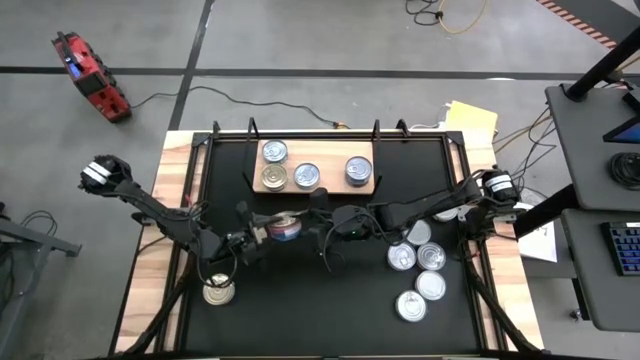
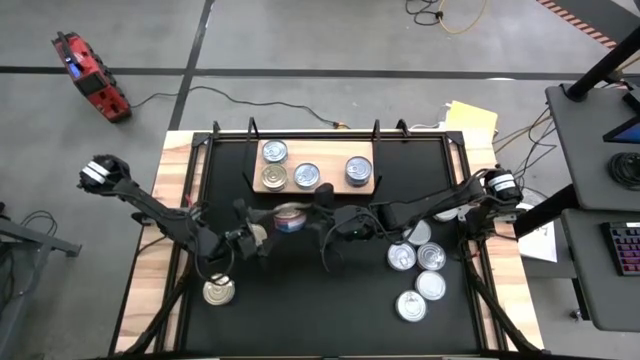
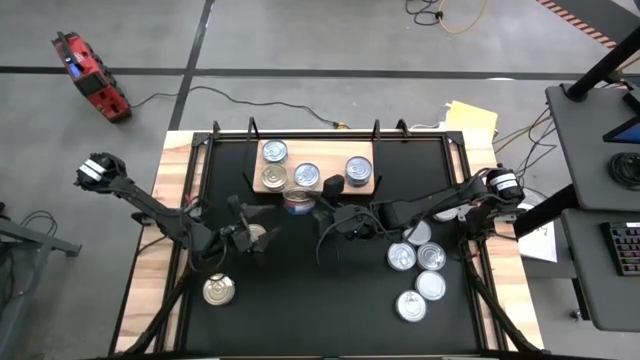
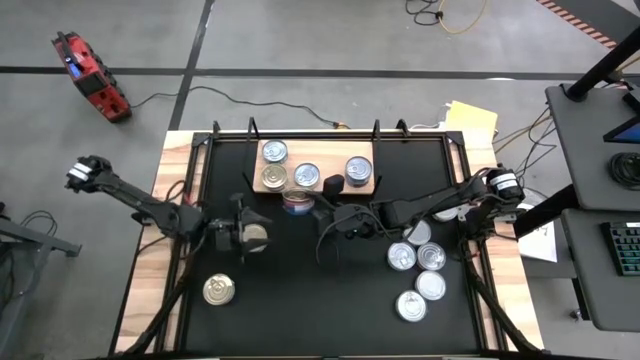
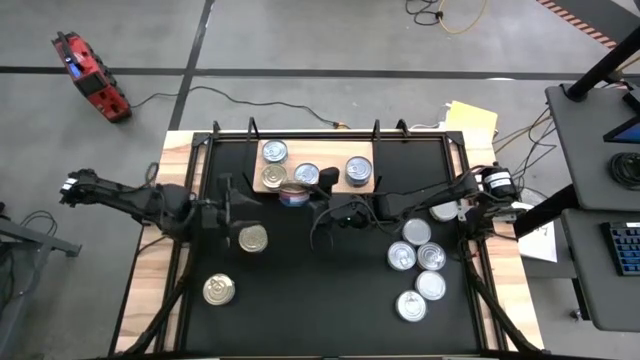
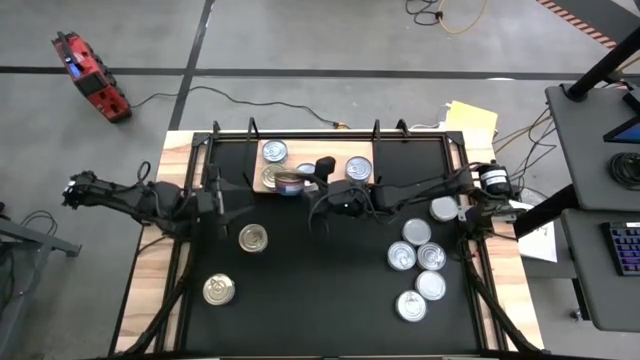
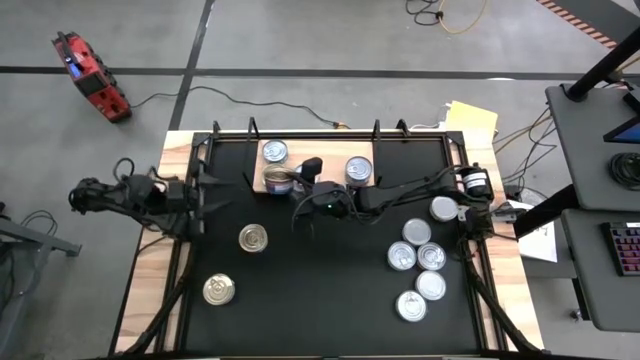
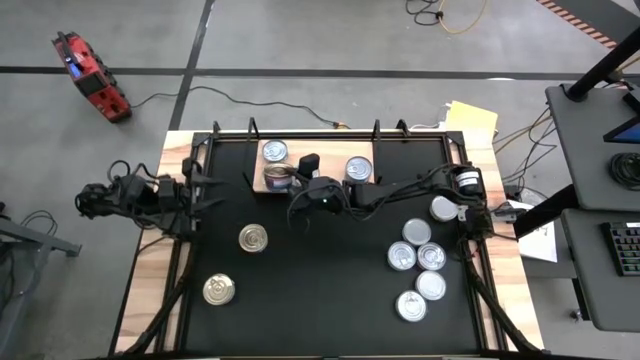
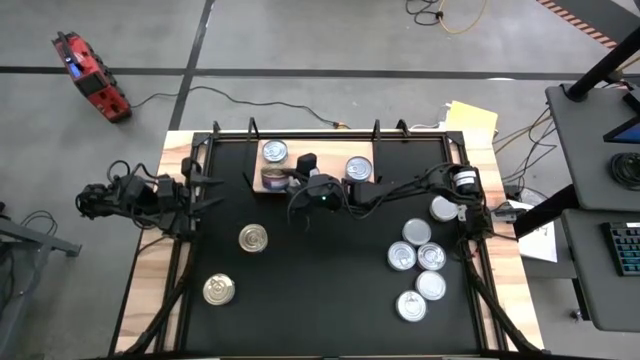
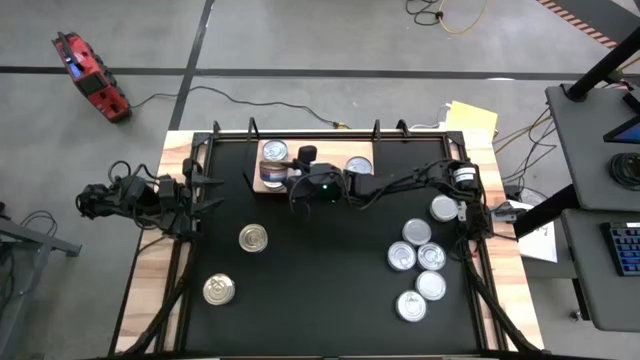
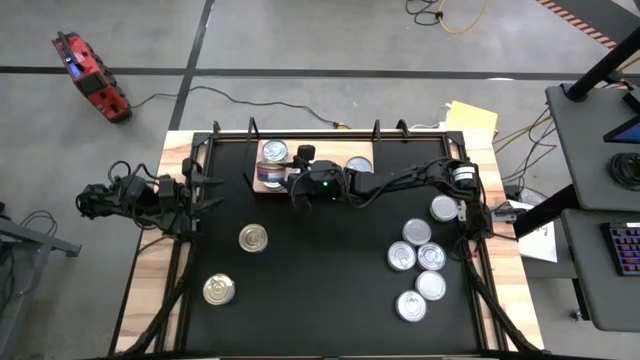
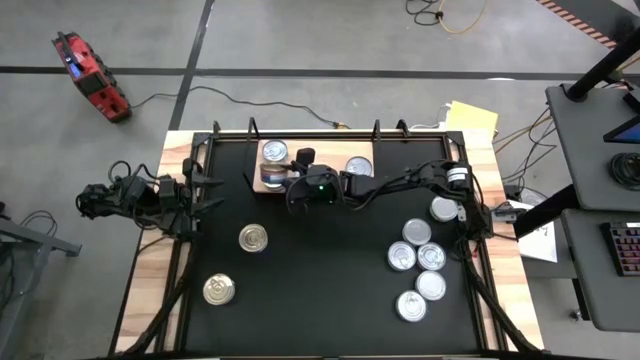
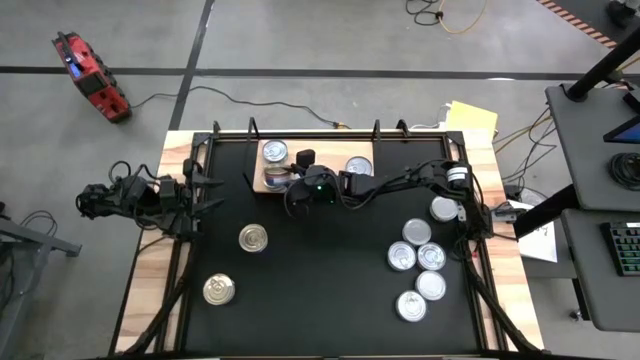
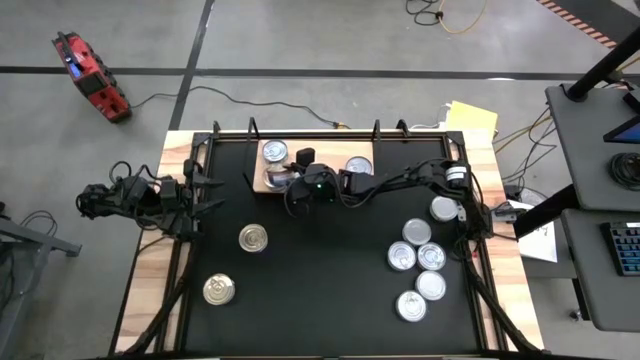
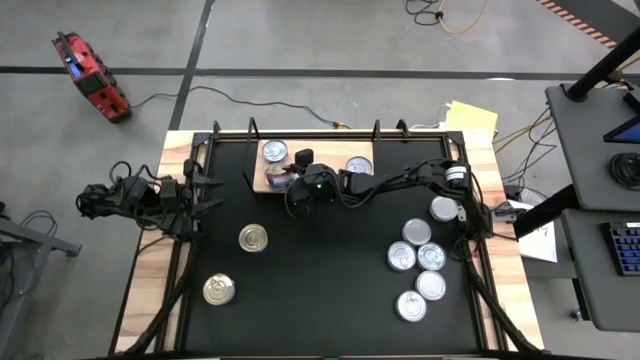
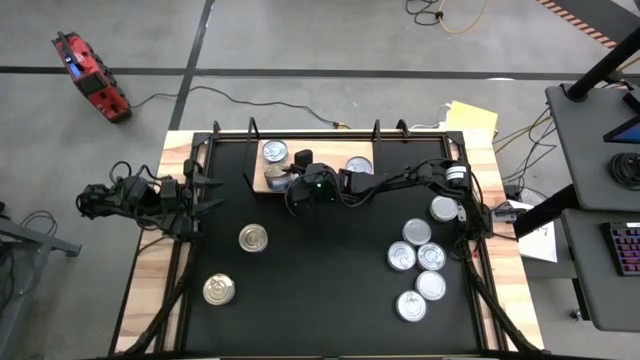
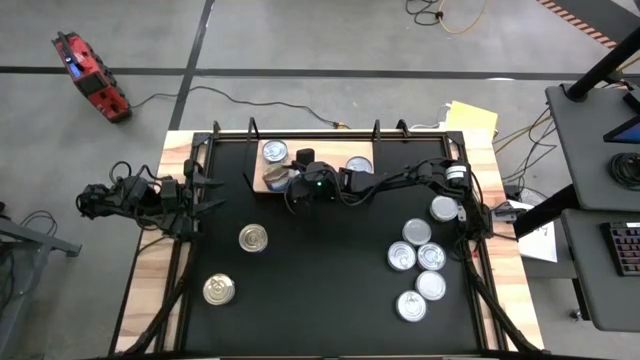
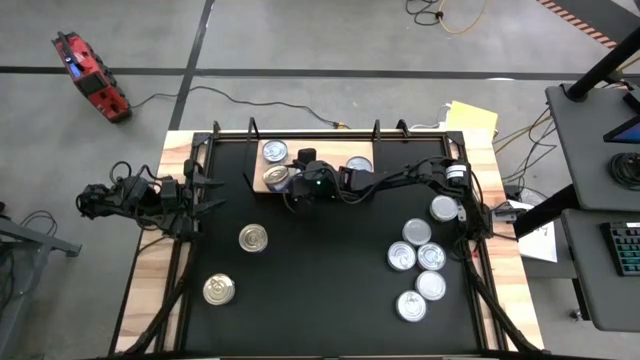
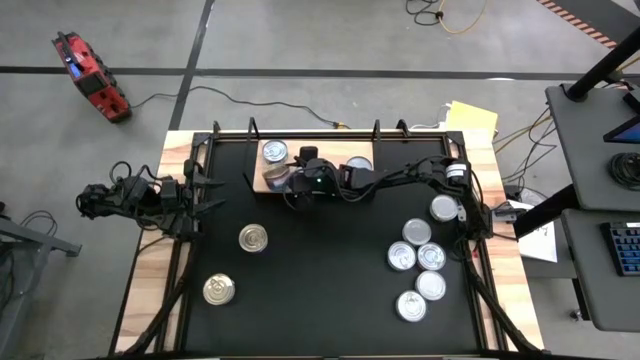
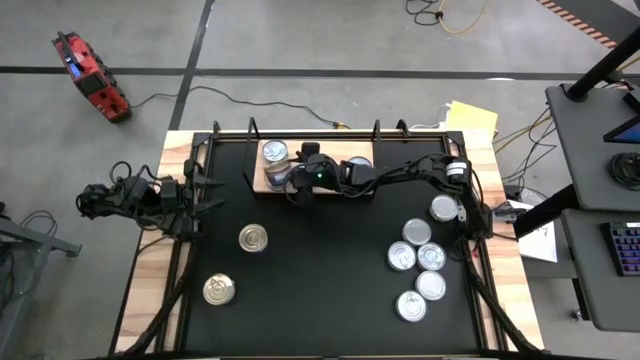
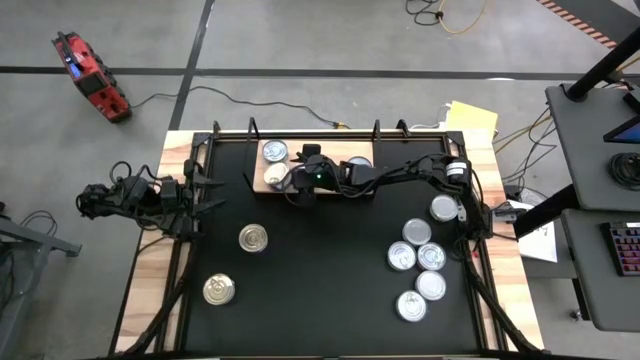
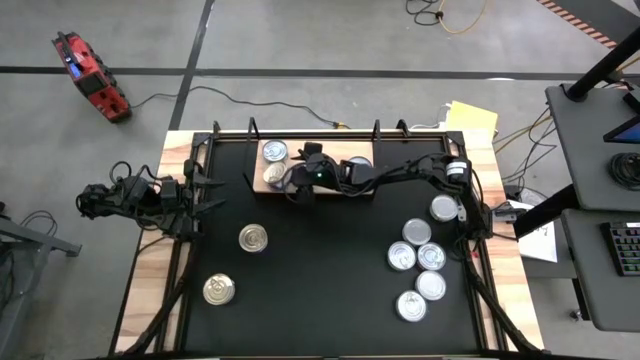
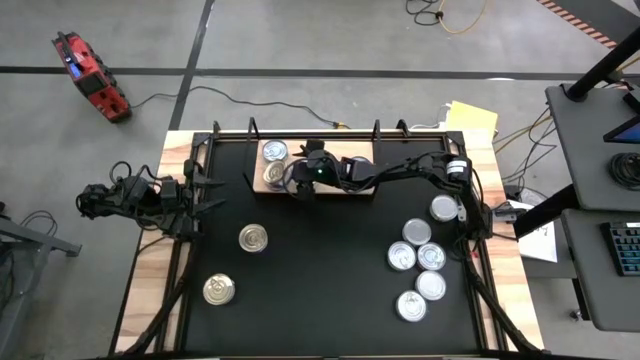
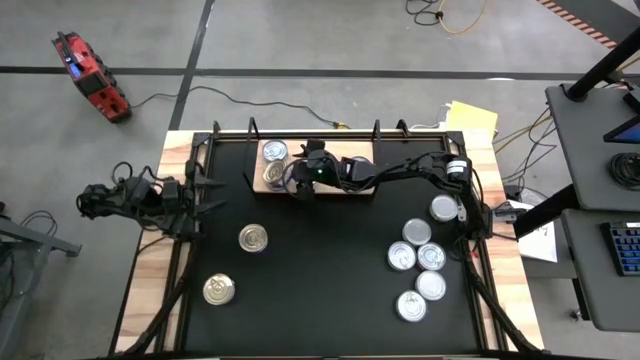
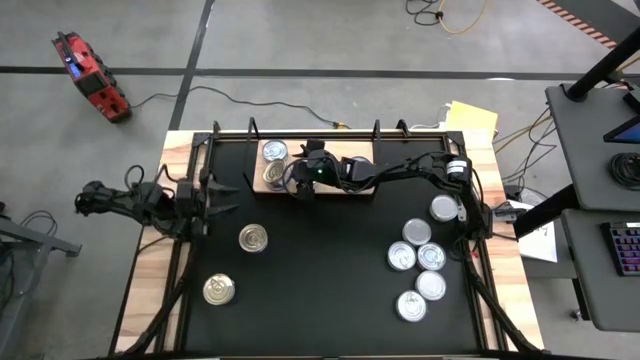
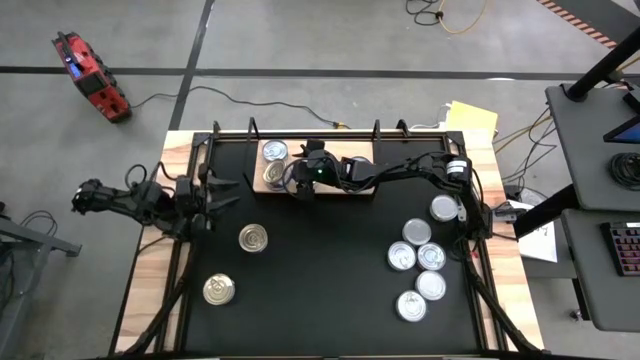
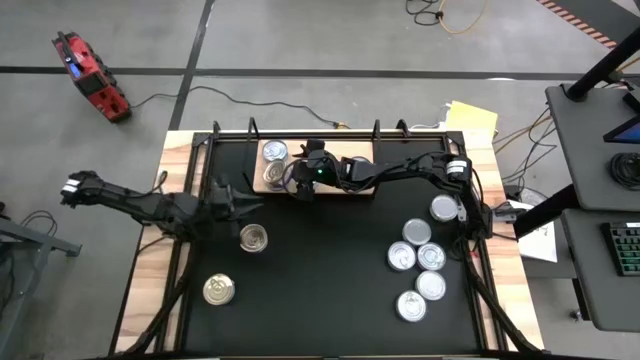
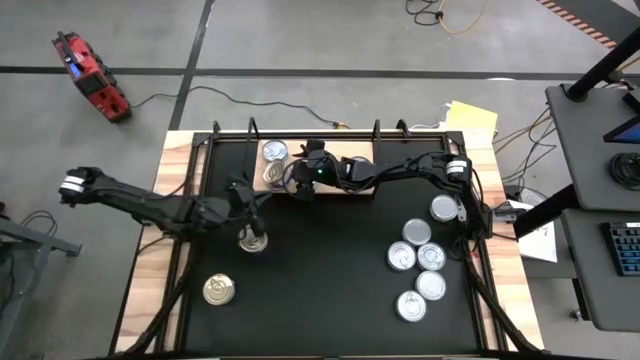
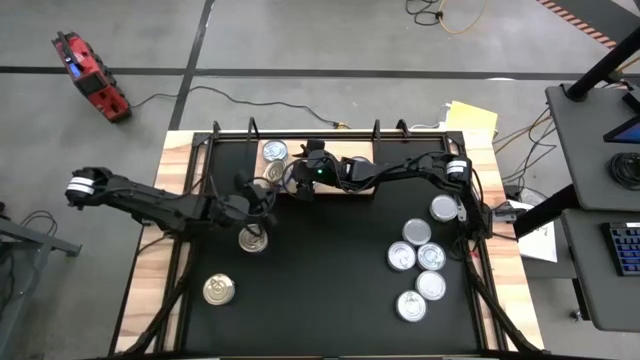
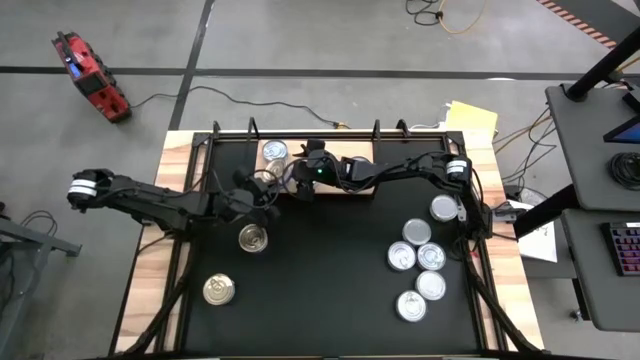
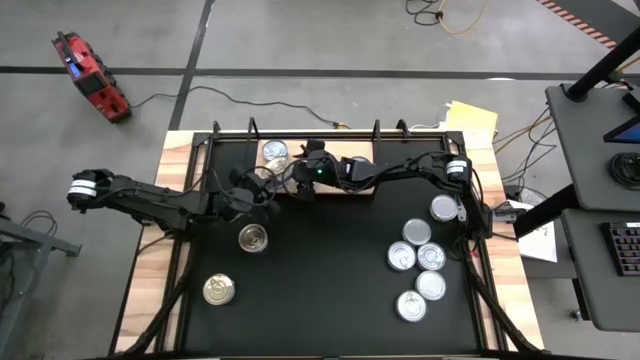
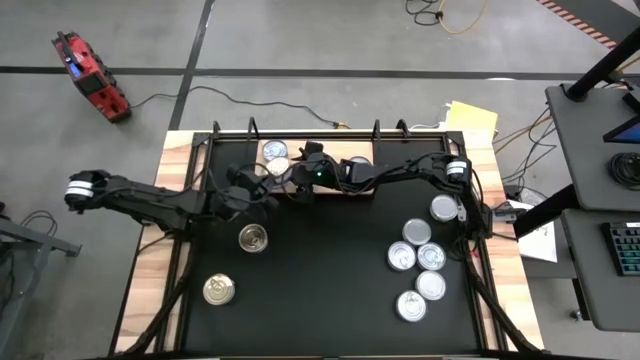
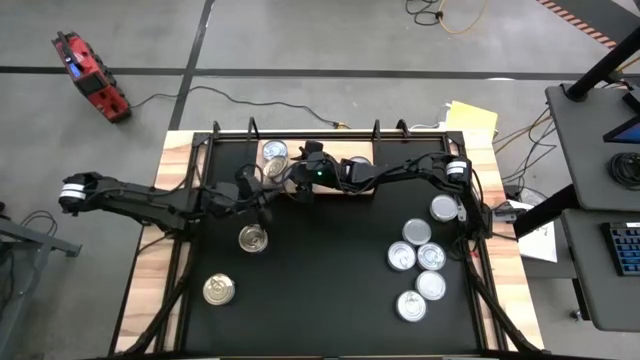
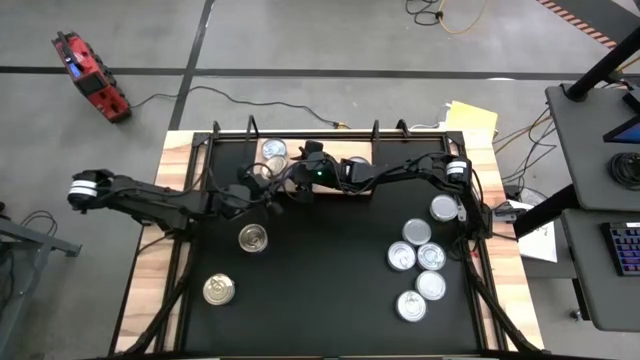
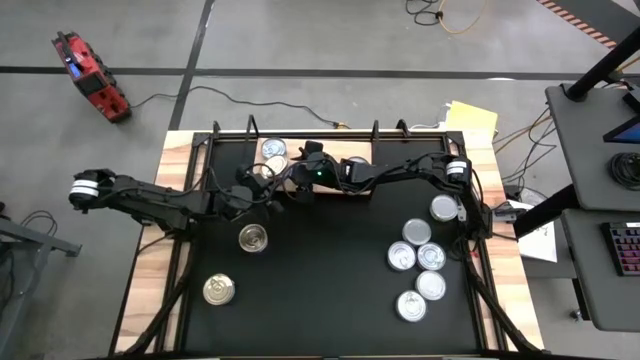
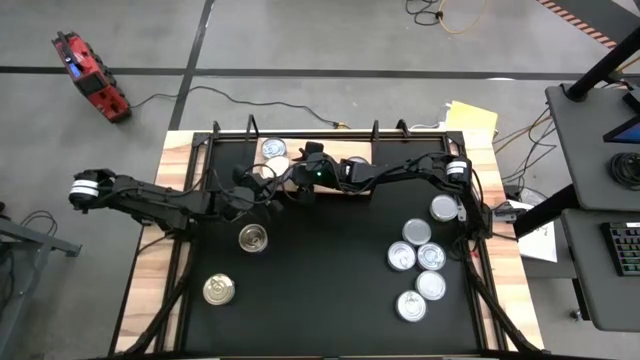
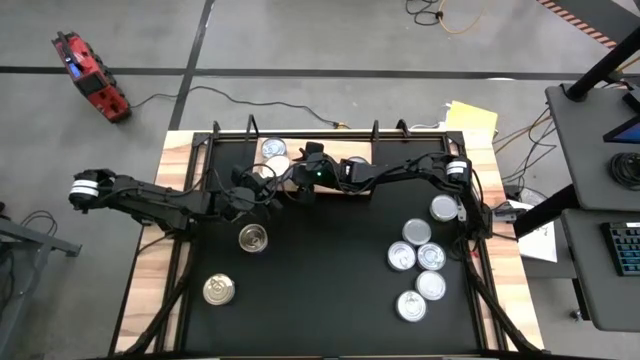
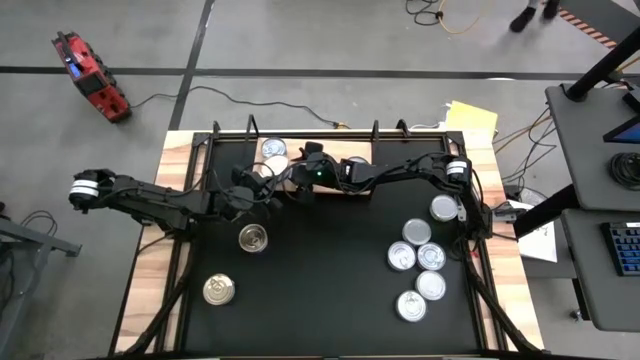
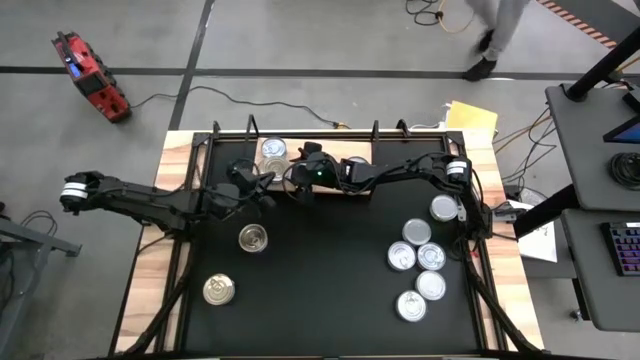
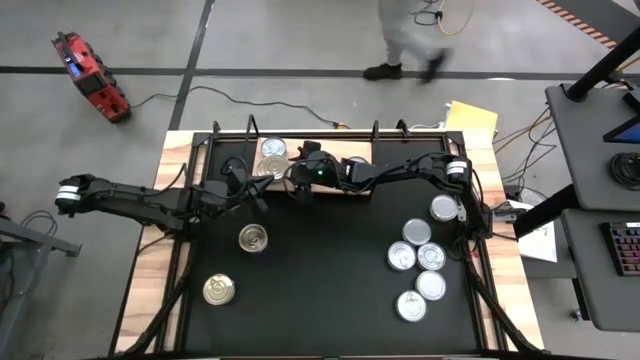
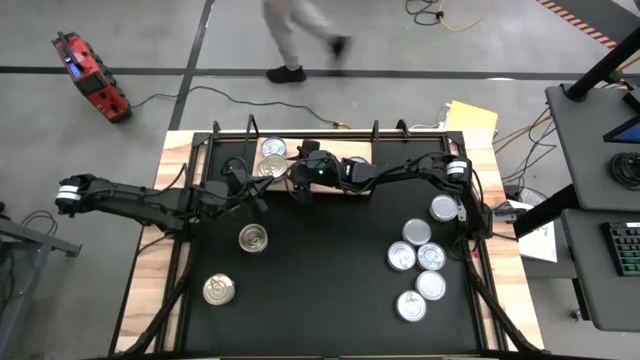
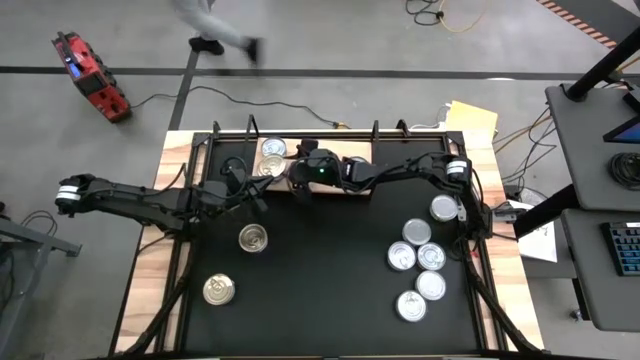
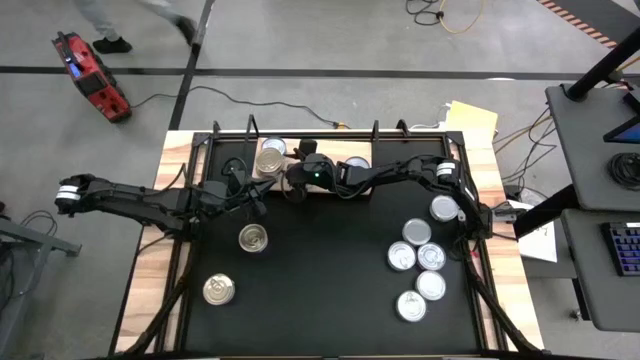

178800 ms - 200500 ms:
Task: Stack canned seafood by type on shelf
Stack the blue tuna can on top of the other blue tuna can on the shelf

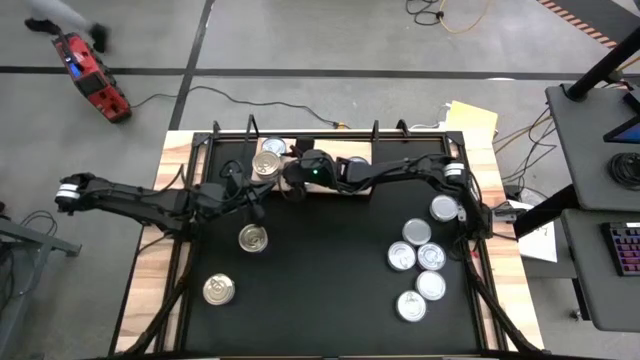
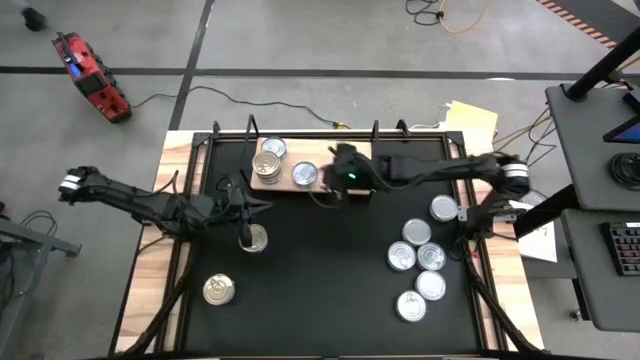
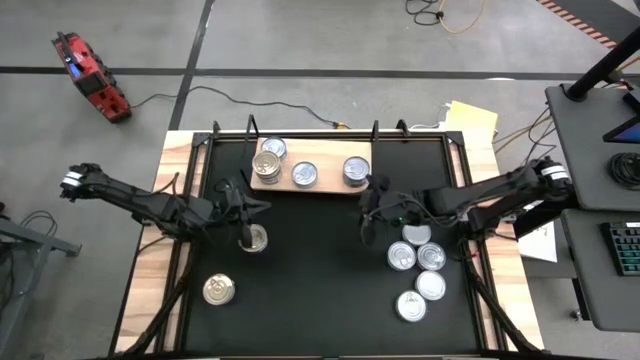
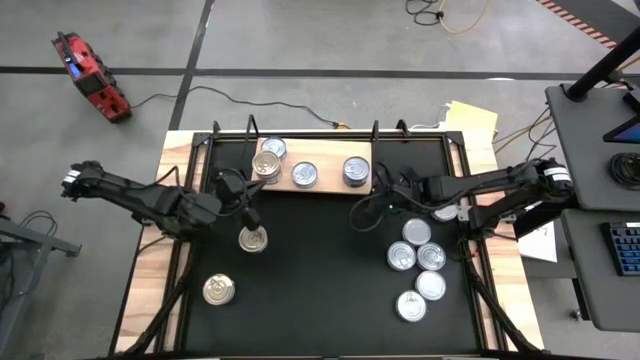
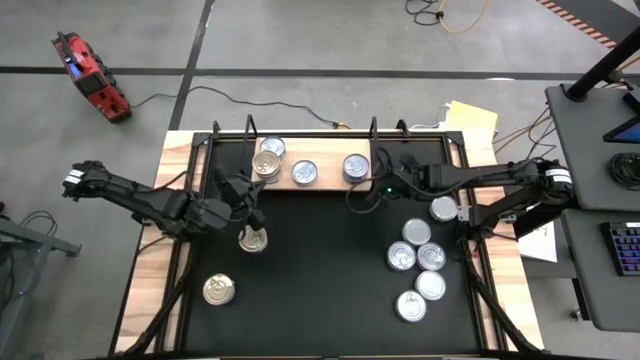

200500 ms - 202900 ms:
Adjust the shelf
